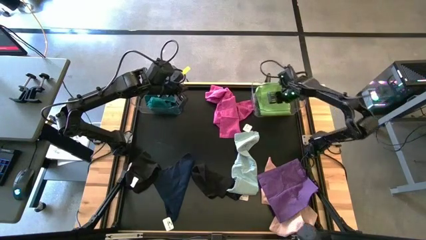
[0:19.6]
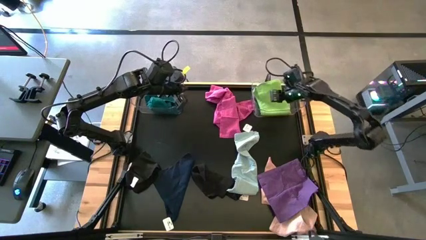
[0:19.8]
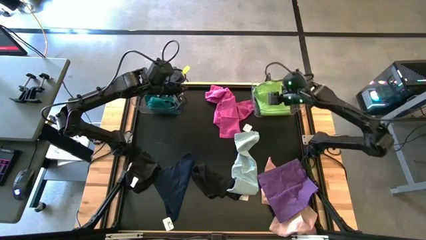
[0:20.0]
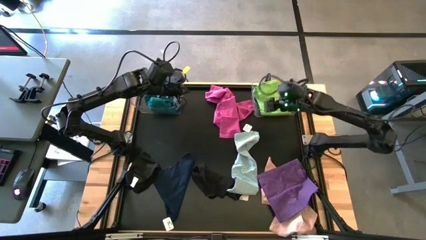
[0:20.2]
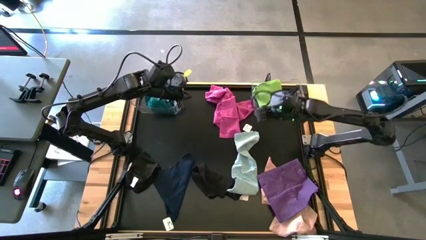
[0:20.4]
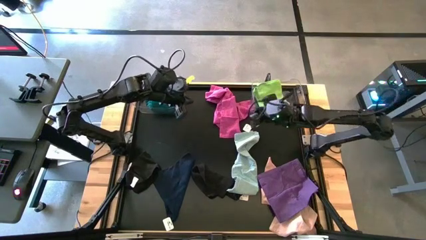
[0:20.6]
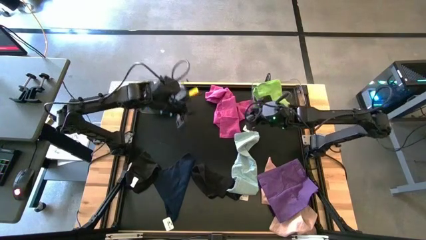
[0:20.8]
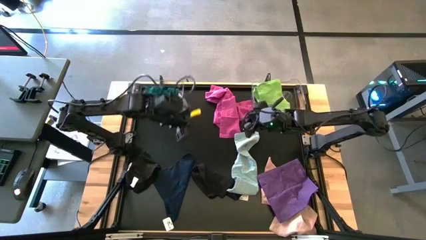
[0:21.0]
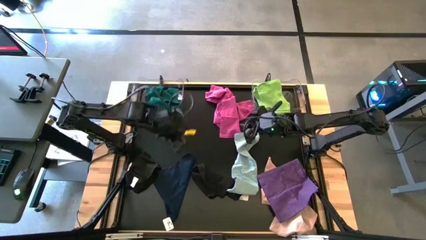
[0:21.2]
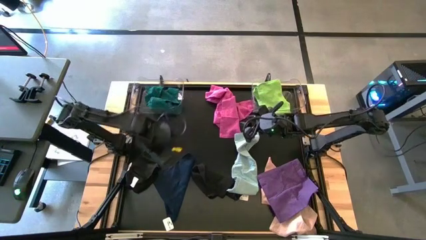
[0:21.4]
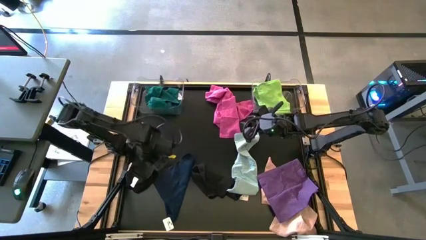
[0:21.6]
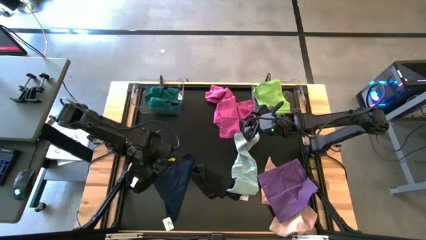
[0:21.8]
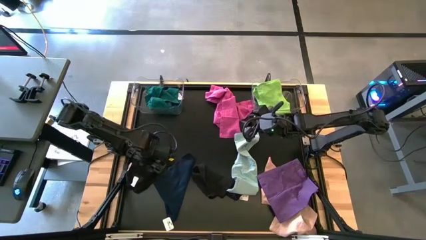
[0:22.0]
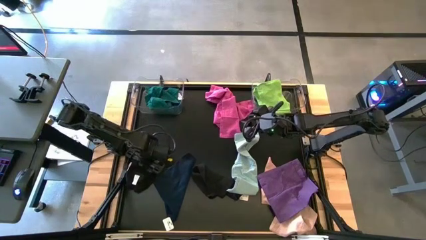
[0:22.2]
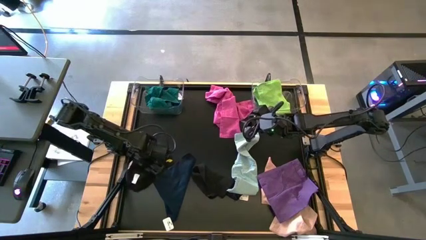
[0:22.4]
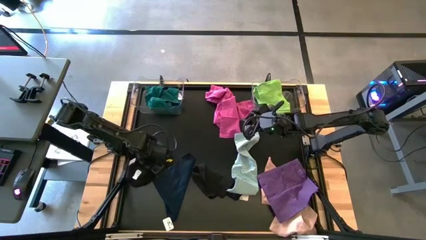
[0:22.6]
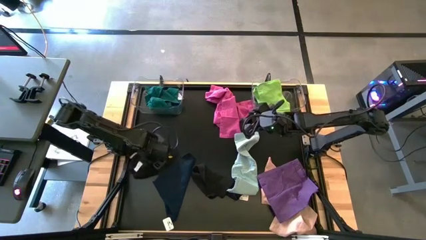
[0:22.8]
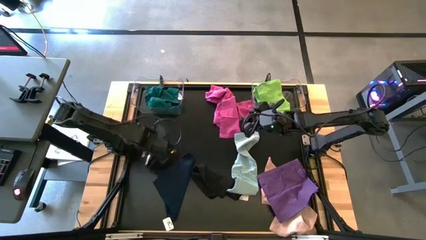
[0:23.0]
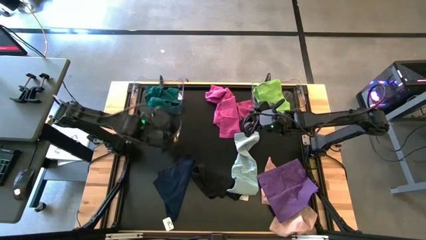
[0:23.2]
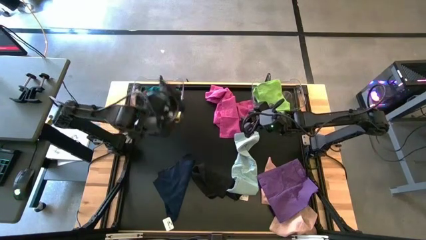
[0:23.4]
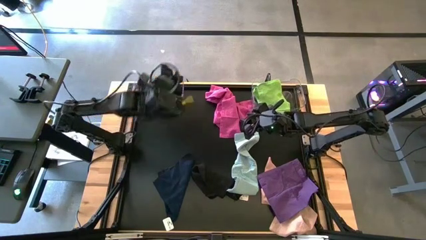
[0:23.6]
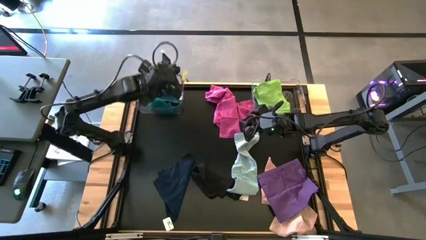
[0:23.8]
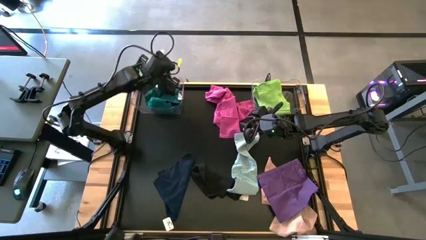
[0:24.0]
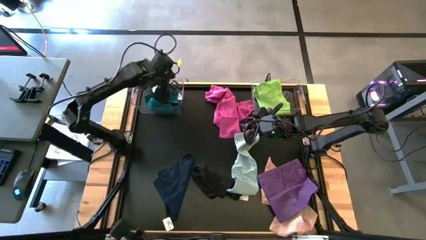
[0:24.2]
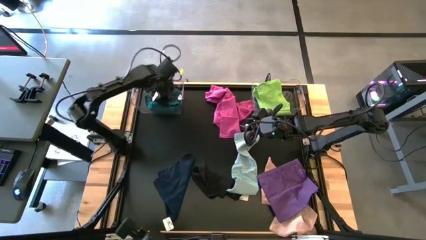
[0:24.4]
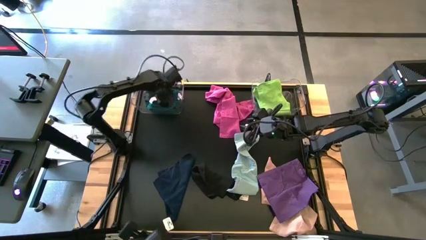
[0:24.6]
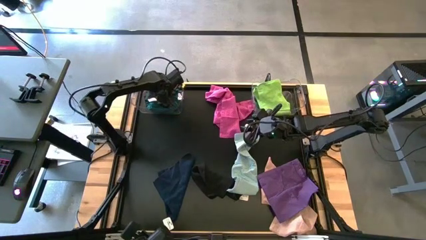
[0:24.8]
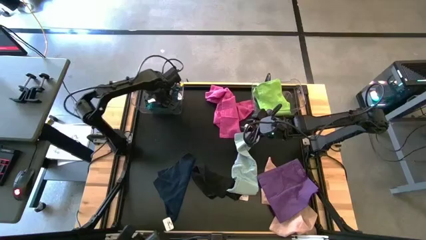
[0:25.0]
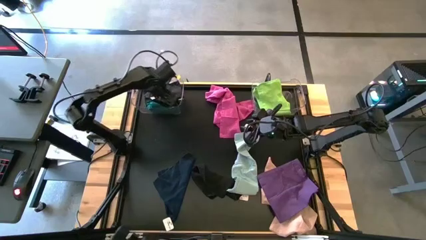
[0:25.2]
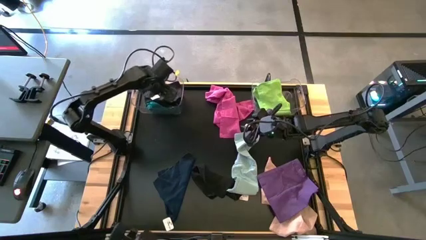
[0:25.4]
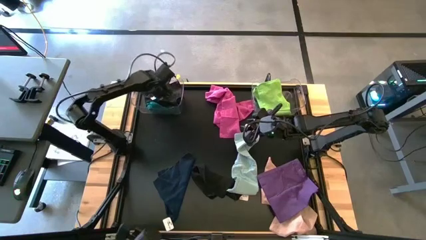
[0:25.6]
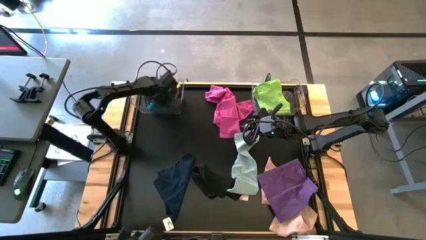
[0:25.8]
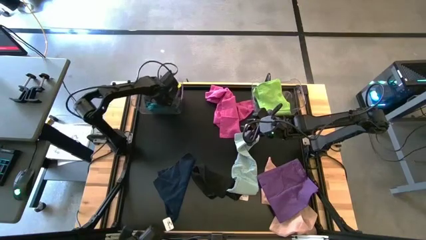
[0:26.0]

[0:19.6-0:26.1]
Task: Sort towels by color in basket
Put the left black kitchen towel into the left transparent bin

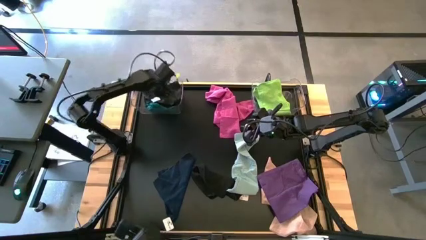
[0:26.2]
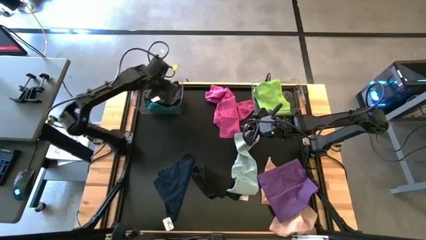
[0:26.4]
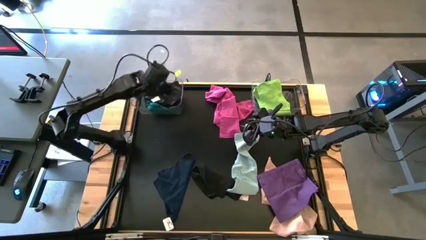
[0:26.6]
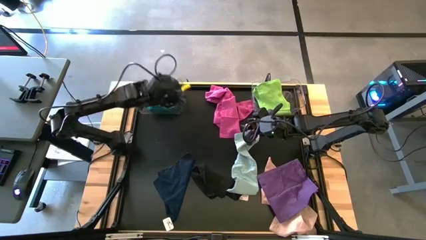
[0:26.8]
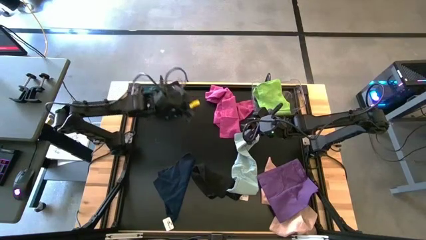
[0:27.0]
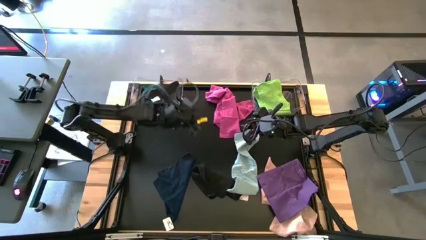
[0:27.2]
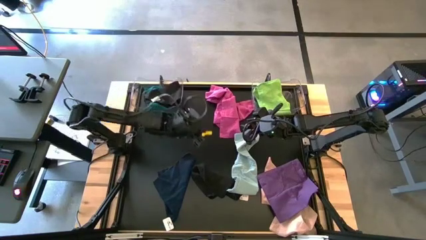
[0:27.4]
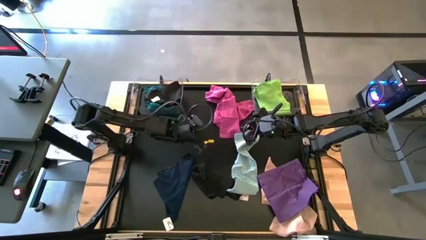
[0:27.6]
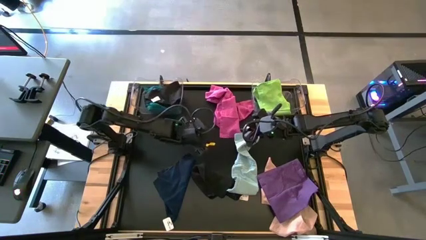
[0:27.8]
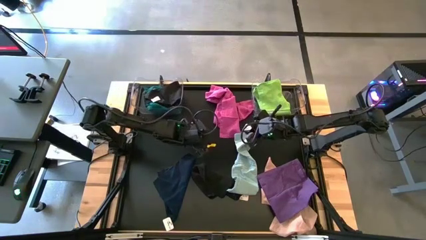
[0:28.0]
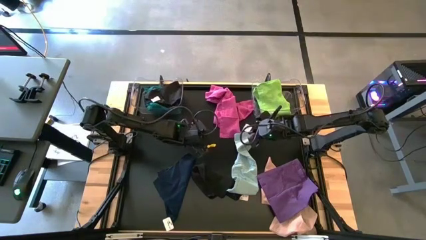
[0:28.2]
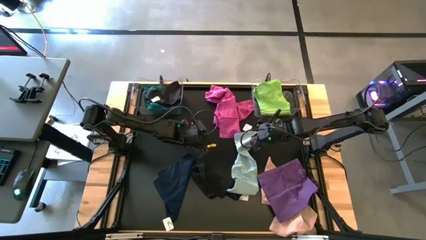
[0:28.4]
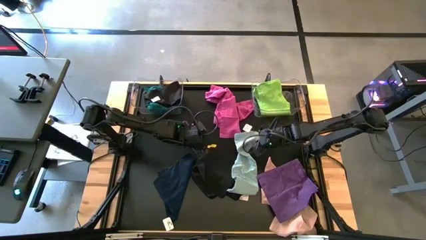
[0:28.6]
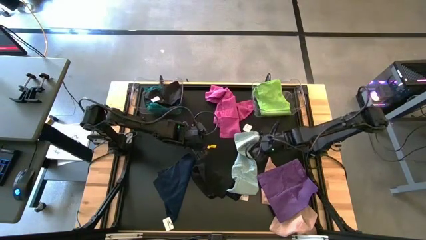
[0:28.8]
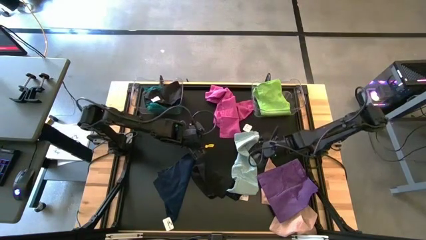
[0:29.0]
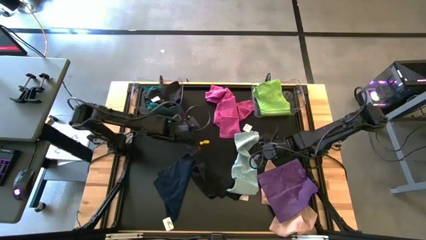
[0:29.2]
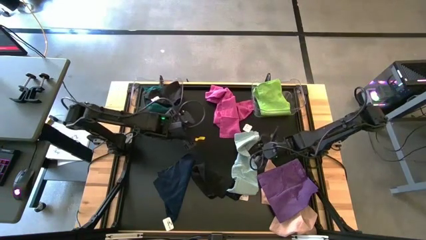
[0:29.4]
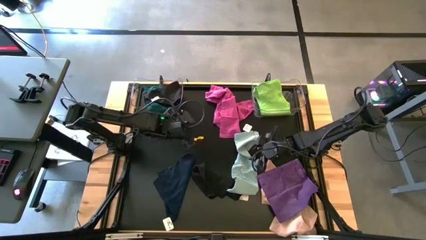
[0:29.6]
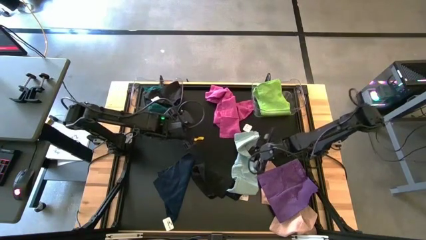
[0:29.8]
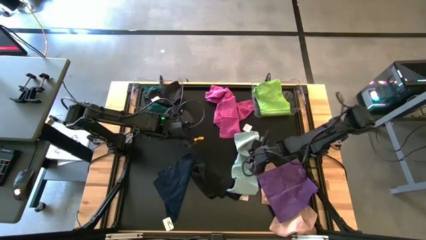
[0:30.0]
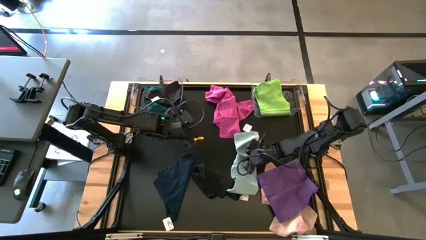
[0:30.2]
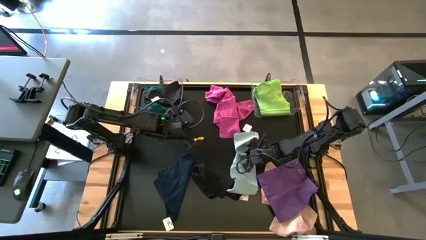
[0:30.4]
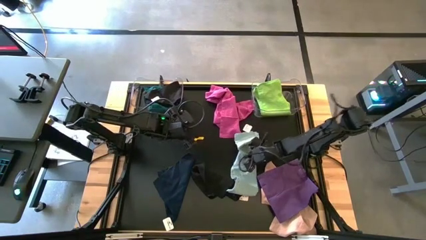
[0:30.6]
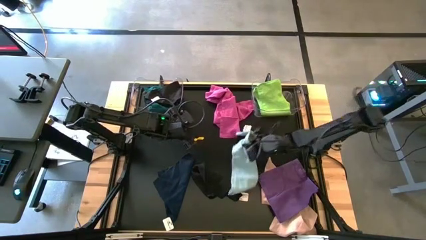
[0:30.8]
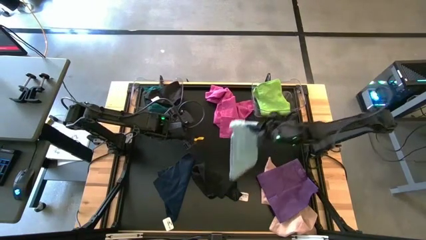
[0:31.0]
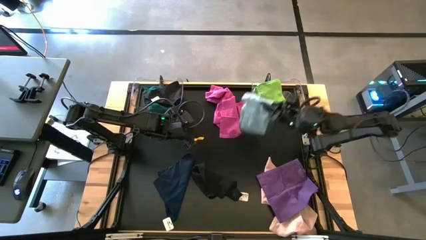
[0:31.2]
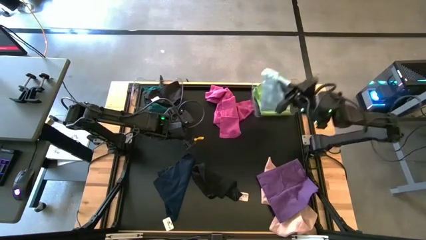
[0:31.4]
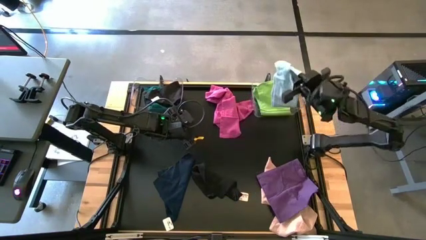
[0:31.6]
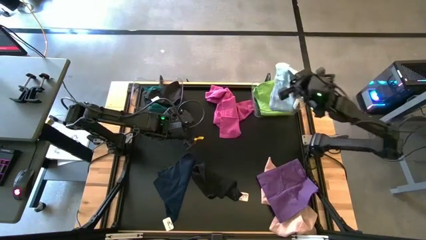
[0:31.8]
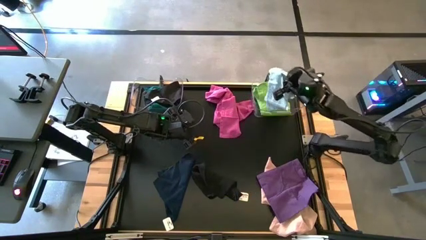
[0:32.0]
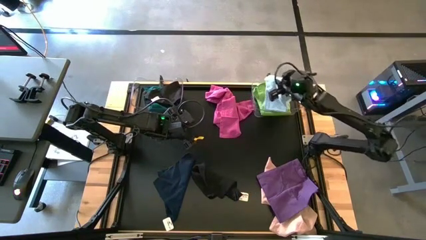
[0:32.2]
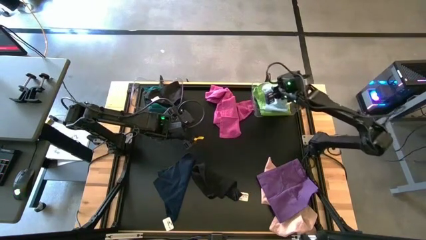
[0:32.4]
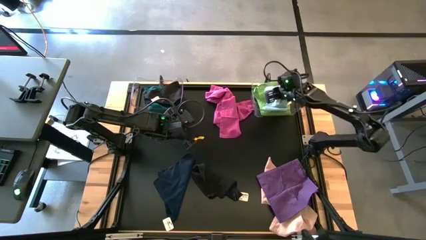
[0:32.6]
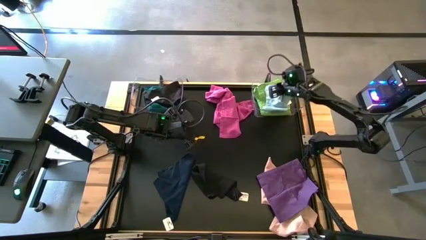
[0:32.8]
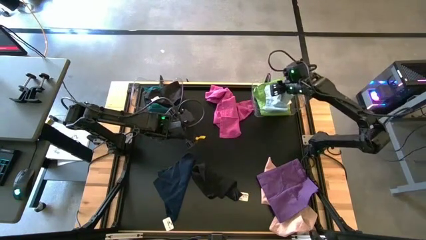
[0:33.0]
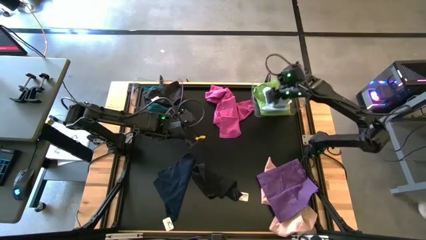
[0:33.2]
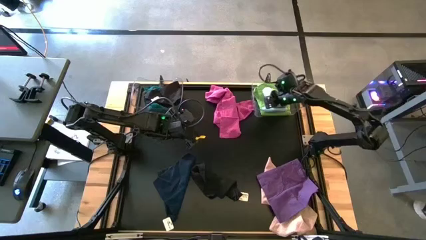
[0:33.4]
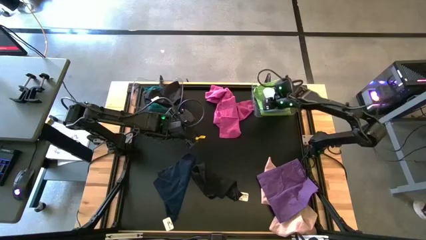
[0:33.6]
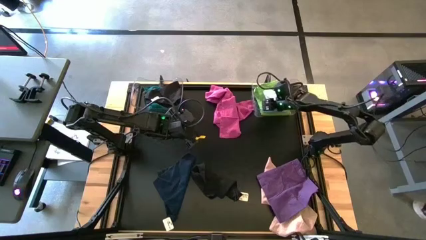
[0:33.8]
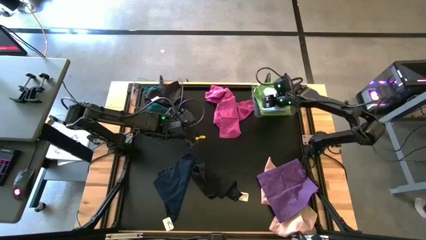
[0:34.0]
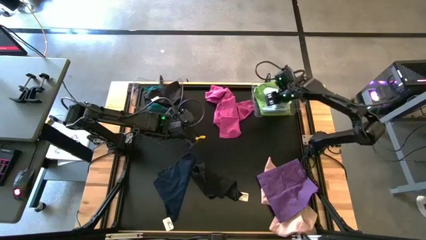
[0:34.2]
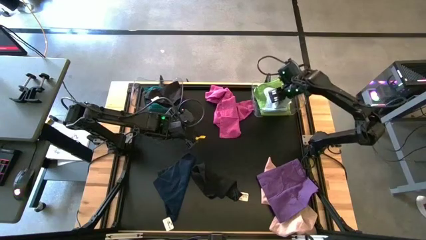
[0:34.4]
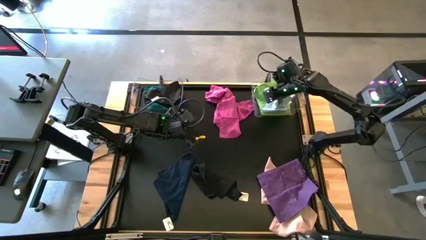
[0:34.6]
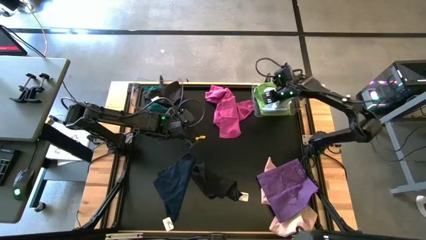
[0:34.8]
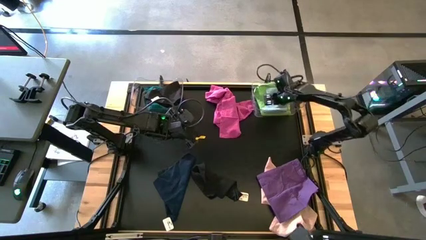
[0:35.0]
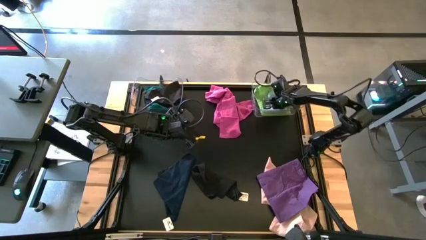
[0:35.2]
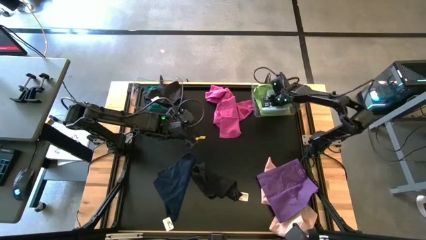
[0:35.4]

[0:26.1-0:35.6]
Put the light blue microfiber towel into the right transparent bin
